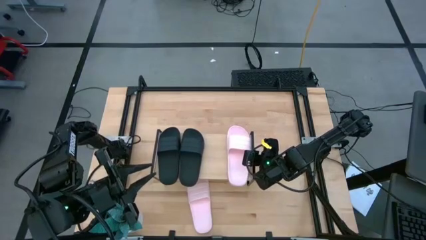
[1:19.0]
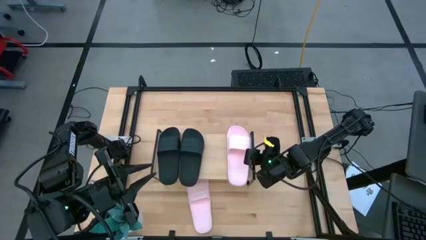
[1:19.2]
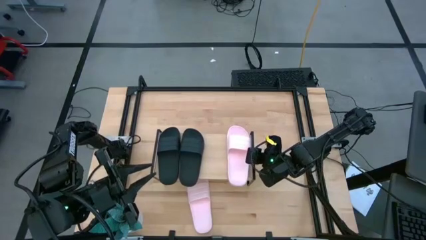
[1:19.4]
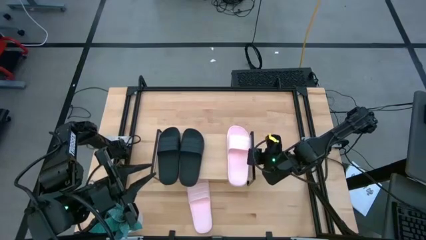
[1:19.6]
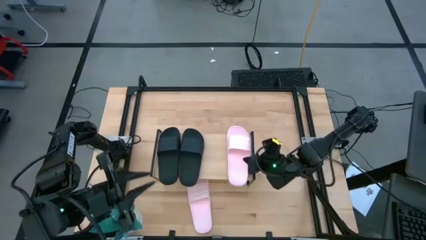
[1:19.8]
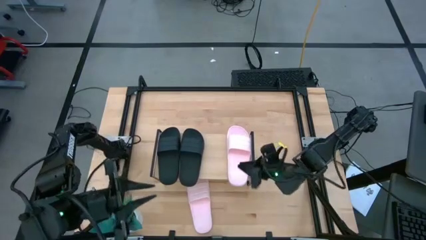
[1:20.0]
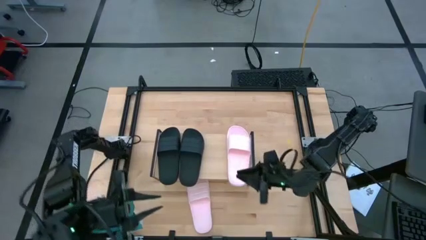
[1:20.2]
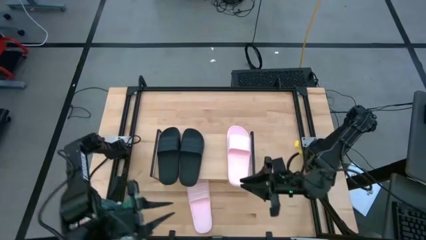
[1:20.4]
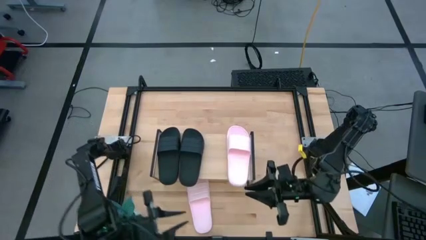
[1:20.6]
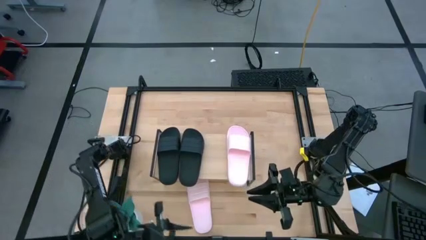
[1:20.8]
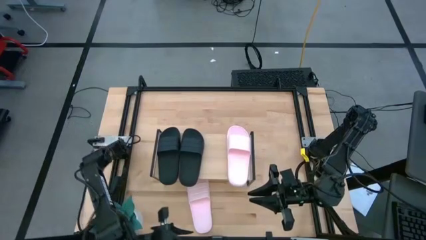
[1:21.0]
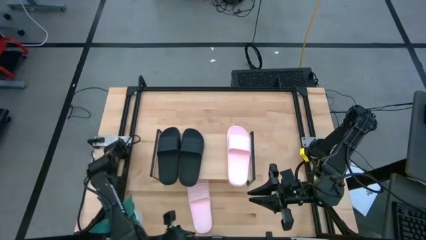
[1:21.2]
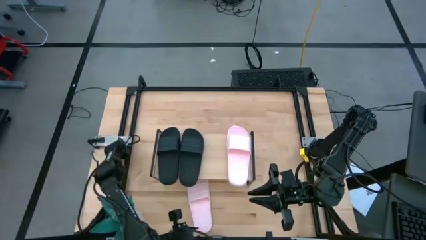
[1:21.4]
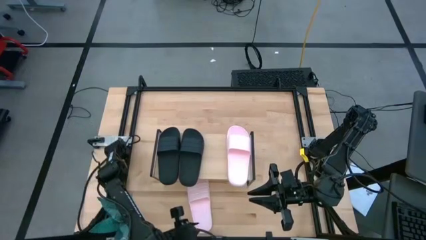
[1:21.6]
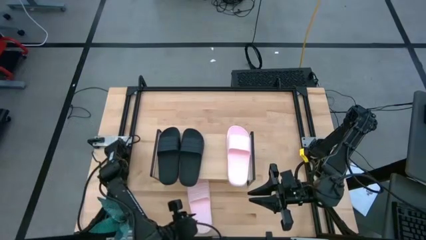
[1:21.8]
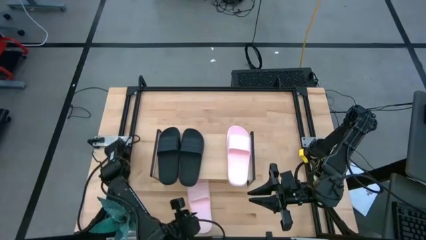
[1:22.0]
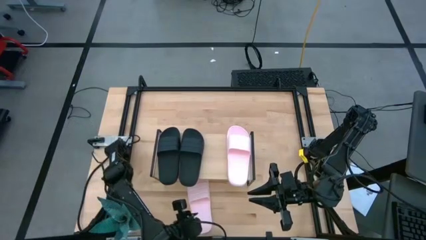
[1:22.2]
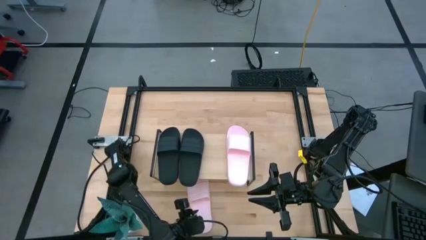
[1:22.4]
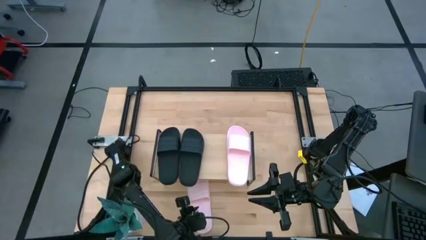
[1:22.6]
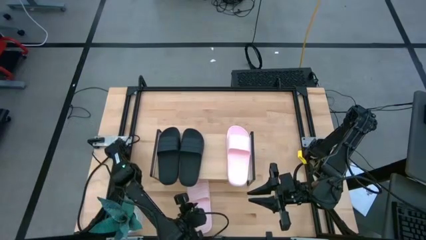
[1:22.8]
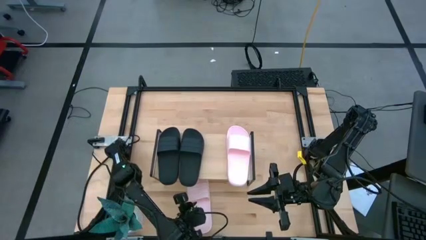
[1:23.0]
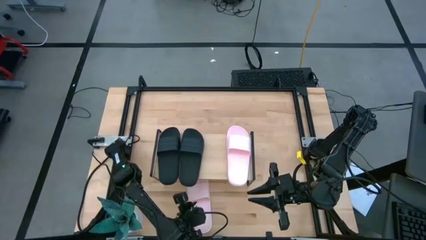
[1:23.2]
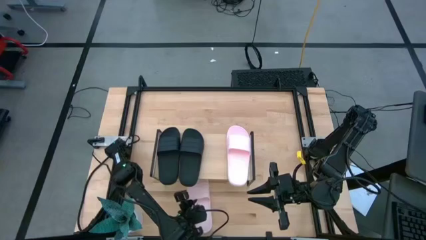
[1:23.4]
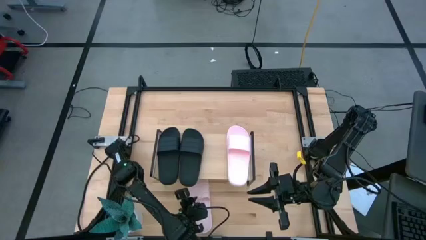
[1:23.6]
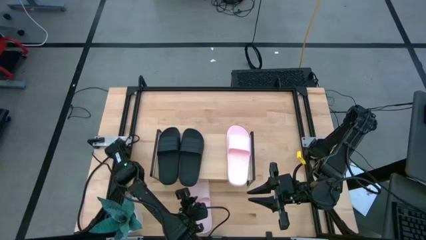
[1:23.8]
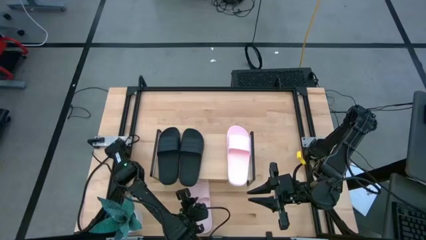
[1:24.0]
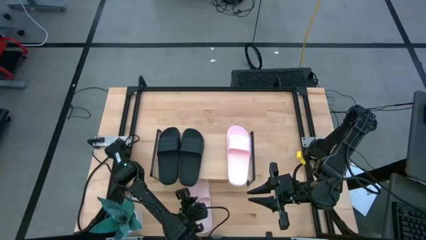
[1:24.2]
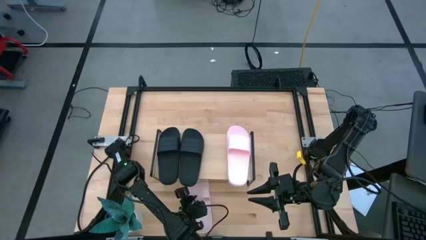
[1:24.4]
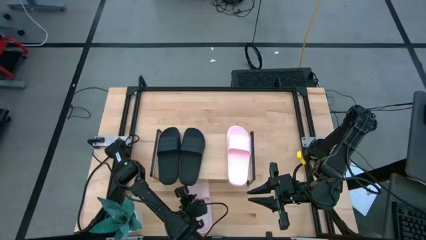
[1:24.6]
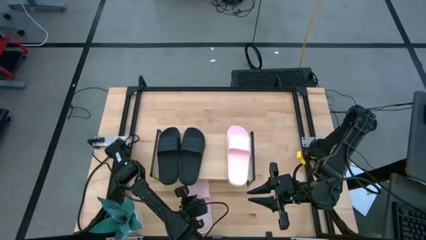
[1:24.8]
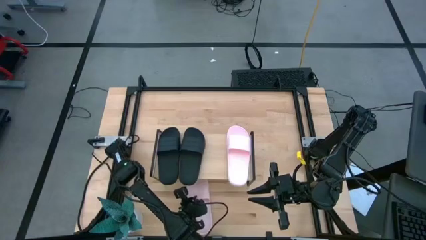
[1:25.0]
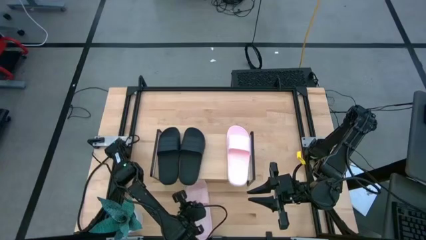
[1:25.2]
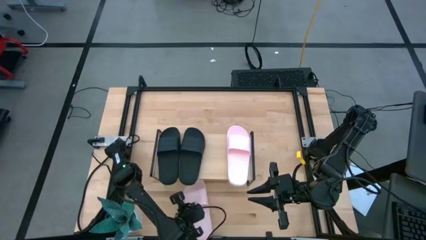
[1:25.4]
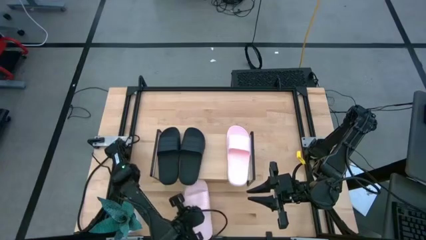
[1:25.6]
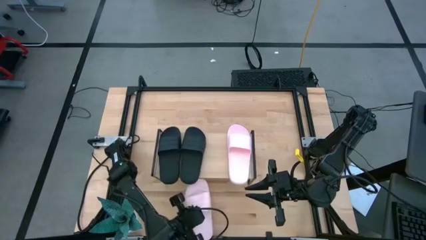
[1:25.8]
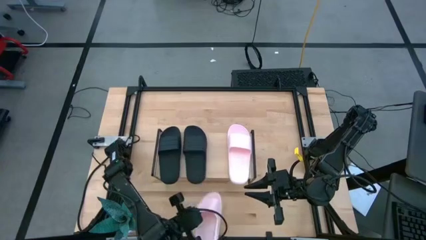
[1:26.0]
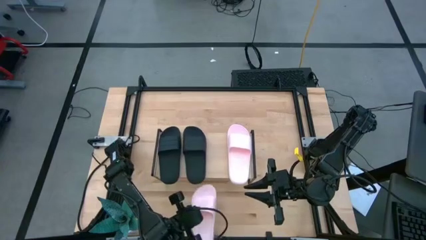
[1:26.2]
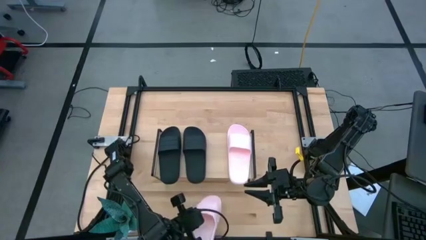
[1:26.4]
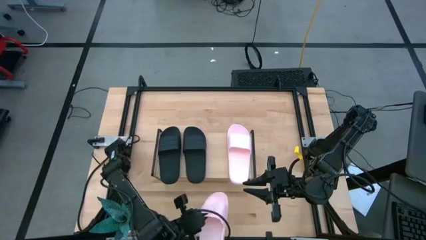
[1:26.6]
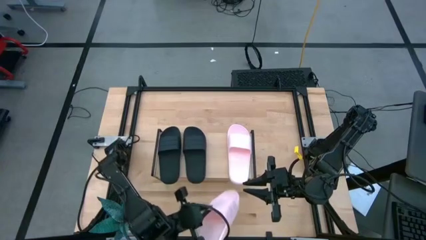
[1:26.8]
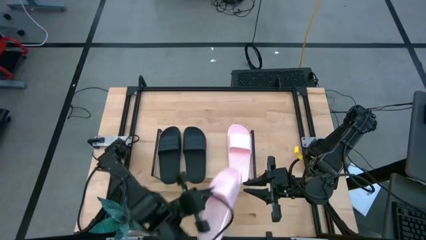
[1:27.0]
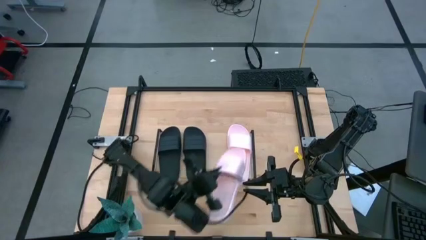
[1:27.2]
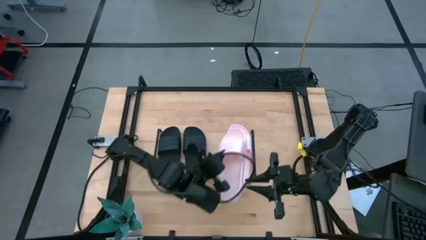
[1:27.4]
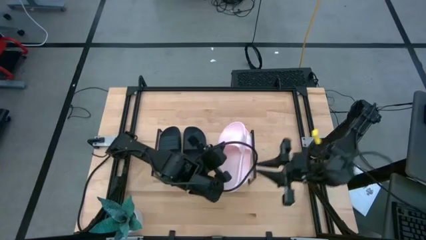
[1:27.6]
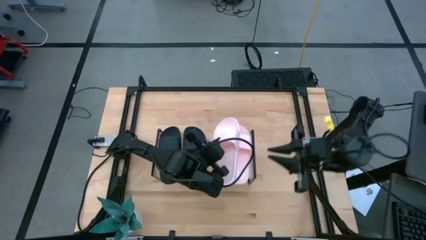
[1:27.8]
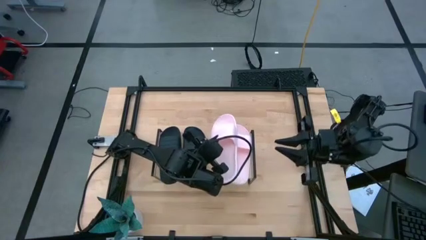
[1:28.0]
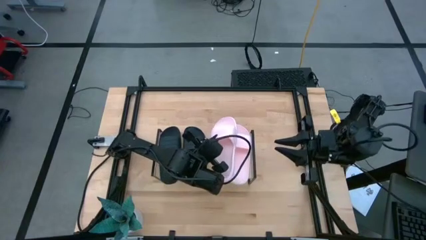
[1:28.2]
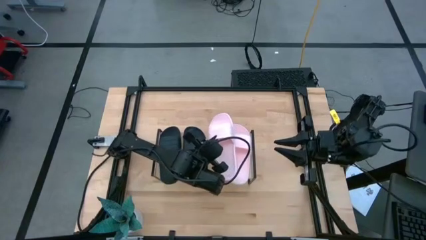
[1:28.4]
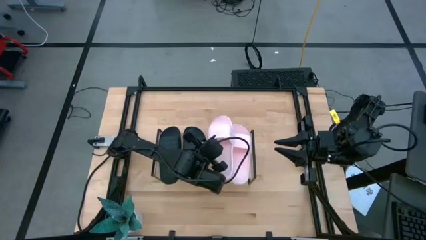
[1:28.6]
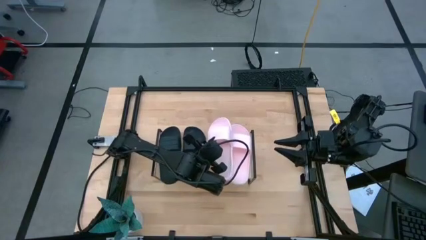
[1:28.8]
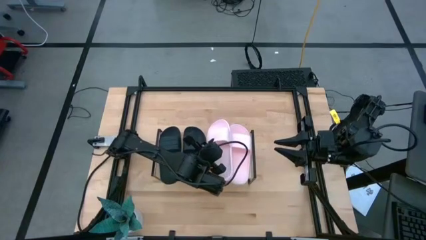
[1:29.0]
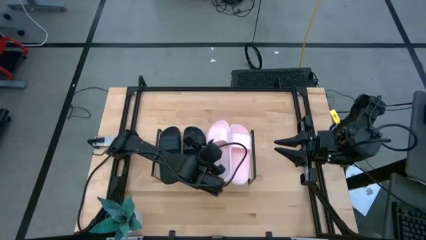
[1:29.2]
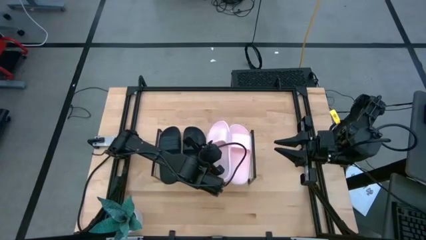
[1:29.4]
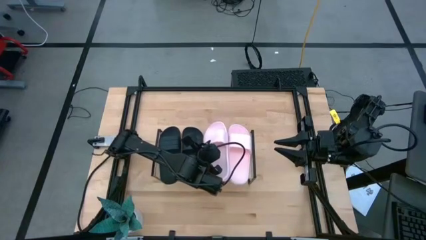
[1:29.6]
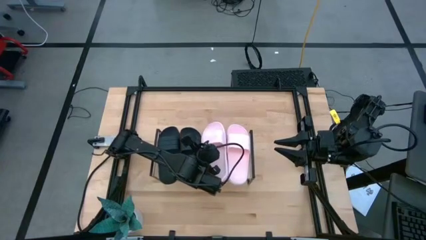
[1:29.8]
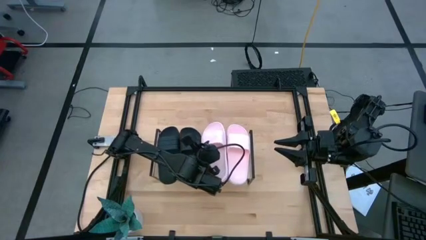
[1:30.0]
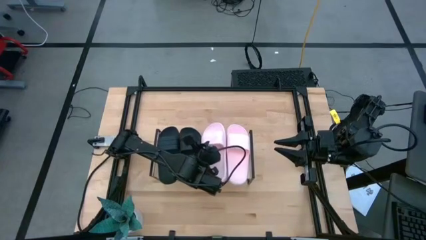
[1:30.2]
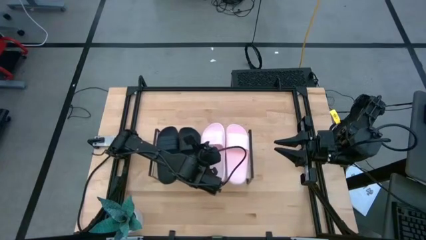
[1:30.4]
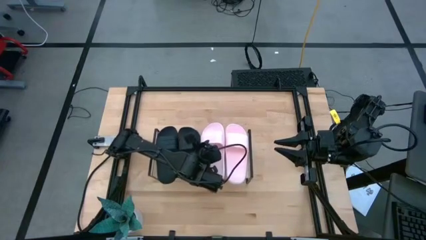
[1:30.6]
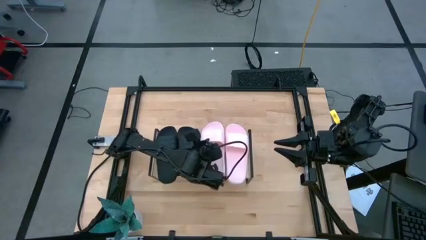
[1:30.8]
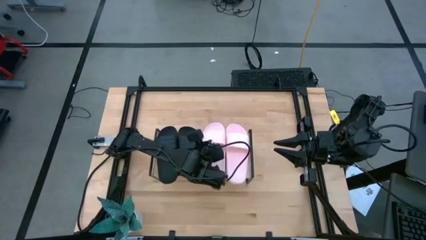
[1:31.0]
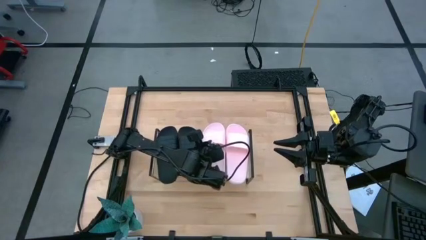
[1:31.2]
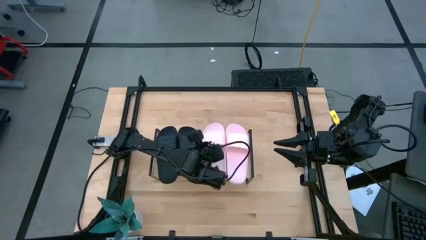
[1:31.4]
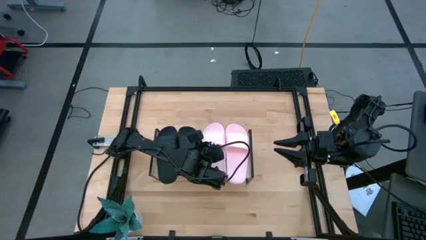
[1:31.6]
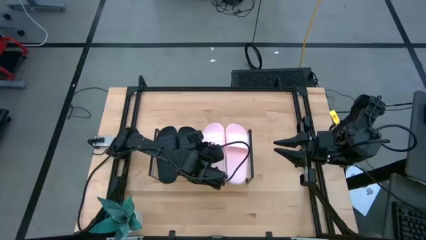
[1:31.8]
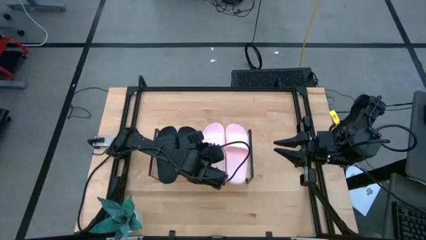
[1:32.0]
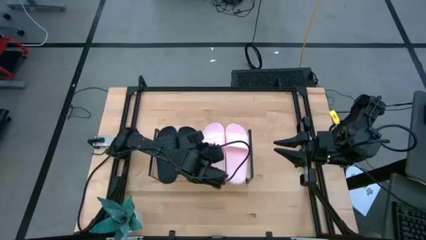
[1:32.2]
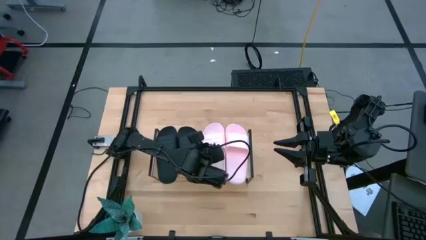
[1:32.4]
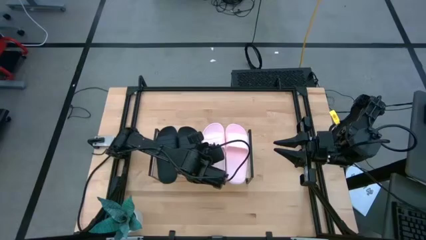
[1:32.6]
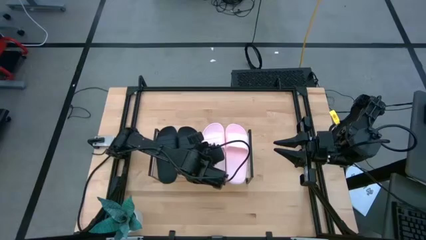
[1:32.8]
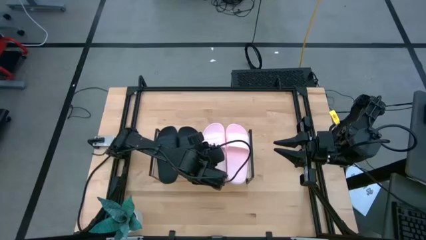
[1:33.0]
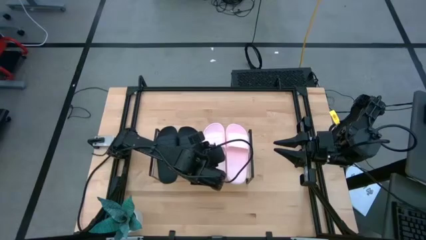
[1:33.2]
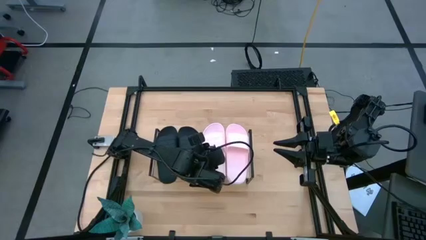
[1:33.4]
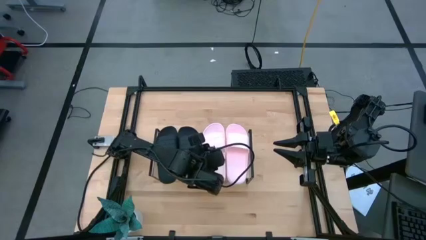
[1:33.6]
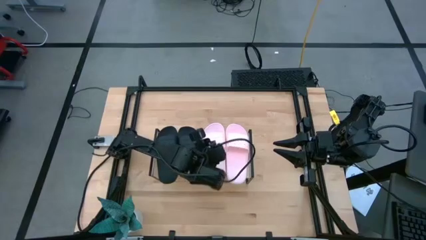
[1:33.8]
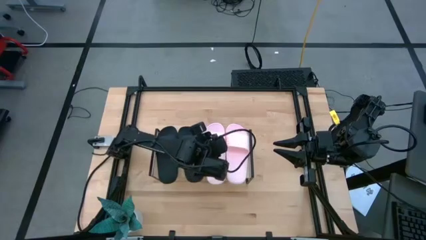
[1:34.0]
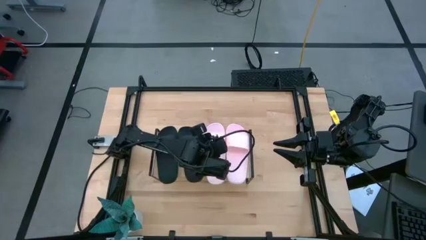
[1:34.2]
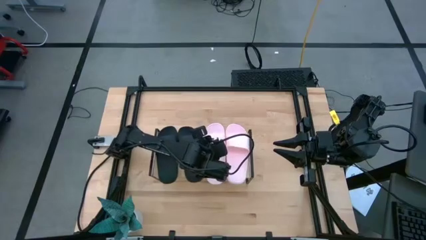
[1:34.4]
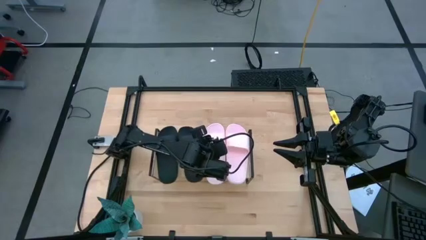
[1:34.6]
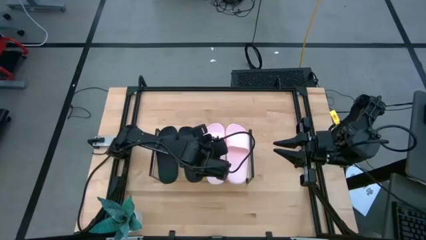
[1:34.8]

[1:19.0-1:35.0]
Task: Pick and place slides into the shelf
Put the pink slide on the shelf
